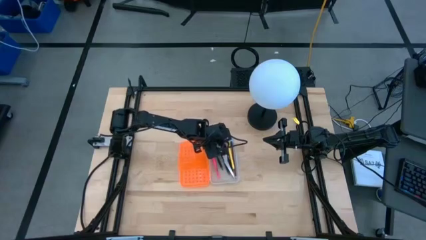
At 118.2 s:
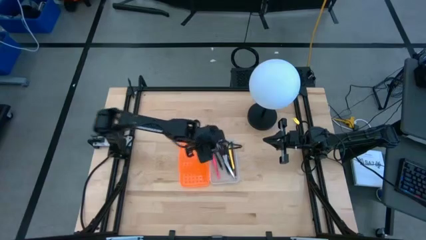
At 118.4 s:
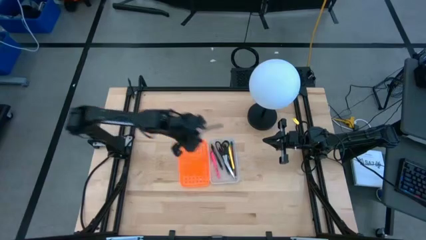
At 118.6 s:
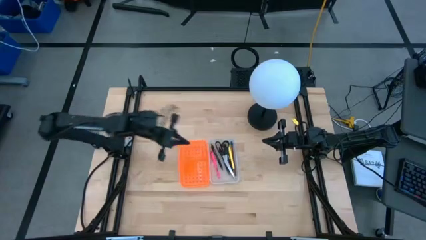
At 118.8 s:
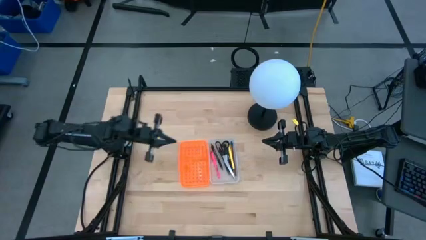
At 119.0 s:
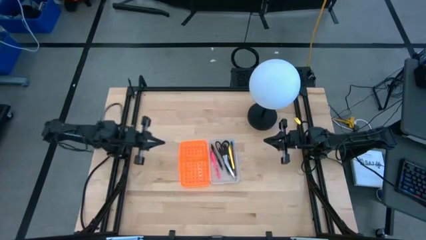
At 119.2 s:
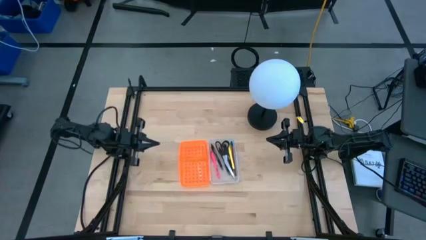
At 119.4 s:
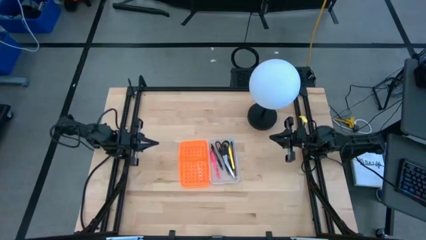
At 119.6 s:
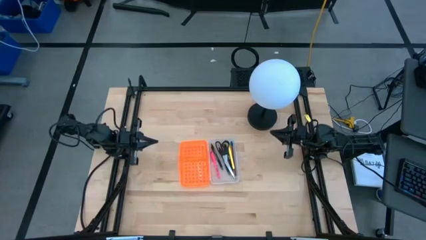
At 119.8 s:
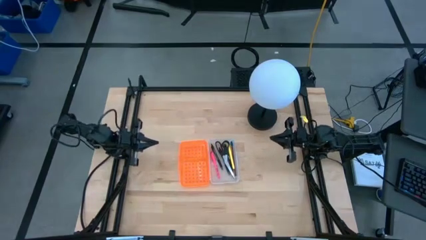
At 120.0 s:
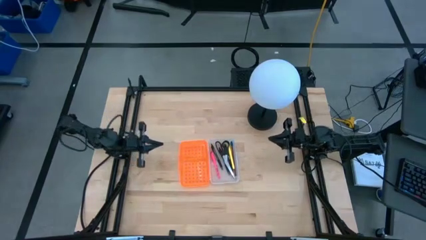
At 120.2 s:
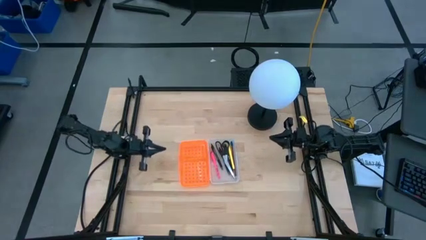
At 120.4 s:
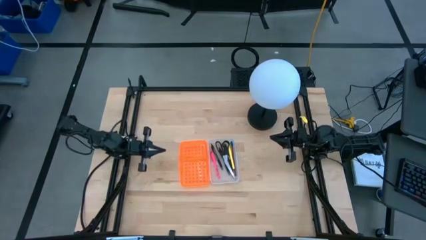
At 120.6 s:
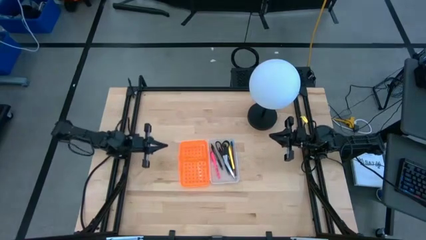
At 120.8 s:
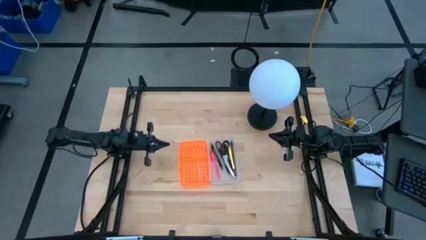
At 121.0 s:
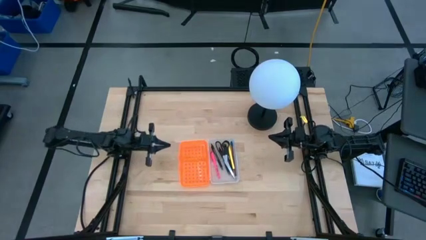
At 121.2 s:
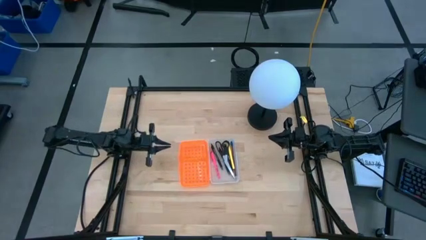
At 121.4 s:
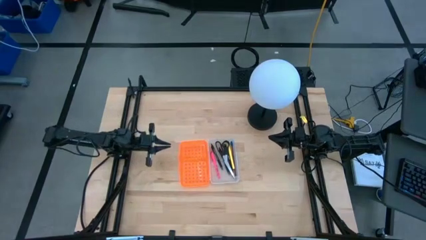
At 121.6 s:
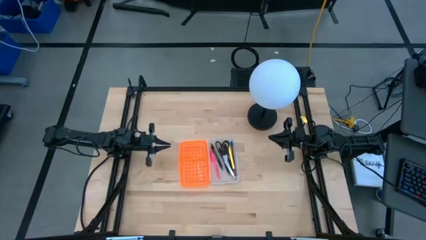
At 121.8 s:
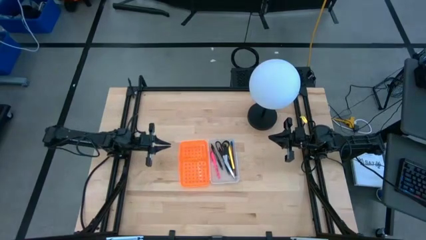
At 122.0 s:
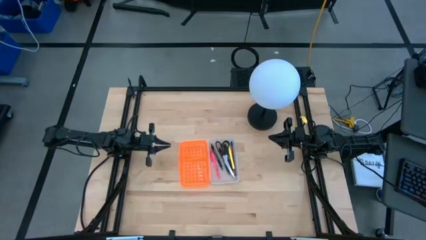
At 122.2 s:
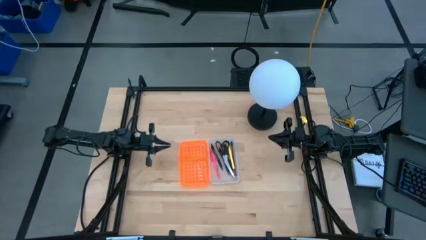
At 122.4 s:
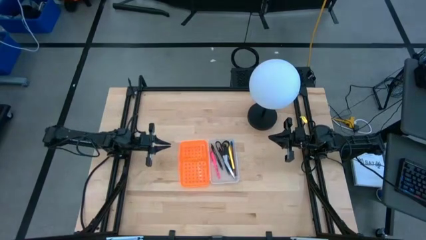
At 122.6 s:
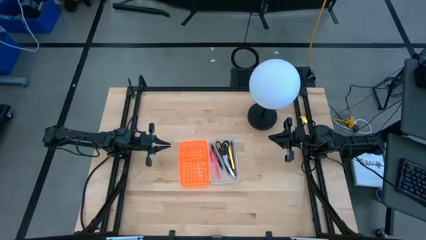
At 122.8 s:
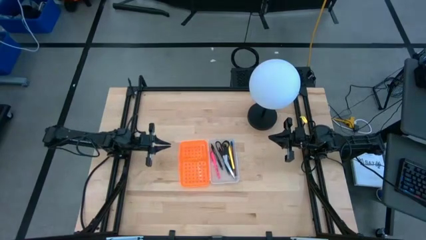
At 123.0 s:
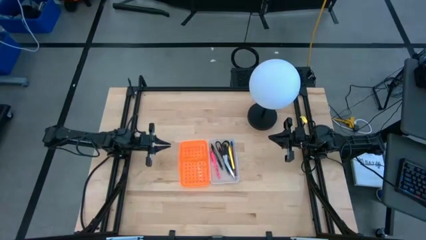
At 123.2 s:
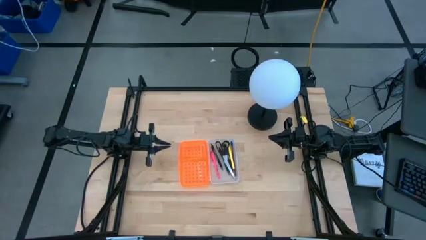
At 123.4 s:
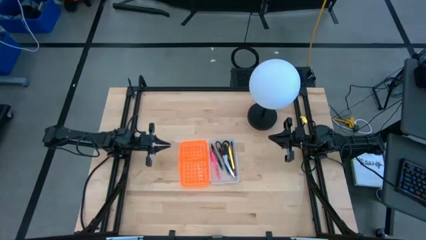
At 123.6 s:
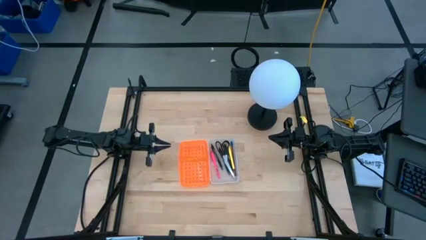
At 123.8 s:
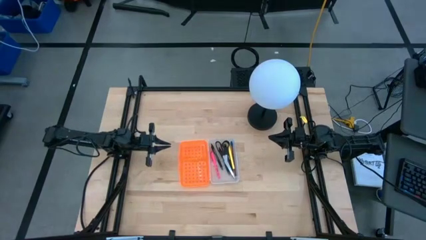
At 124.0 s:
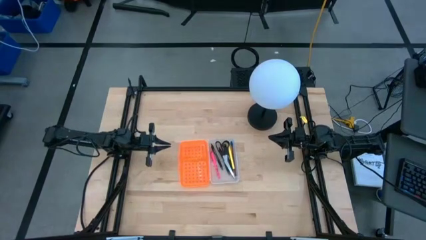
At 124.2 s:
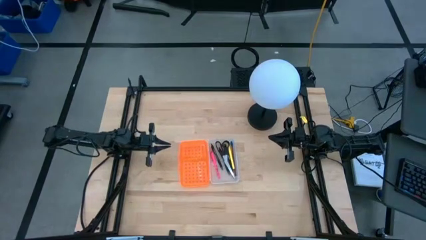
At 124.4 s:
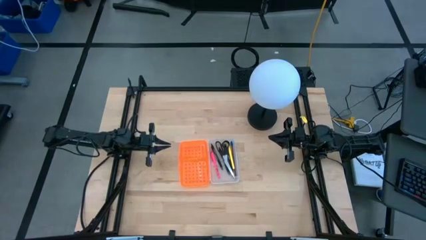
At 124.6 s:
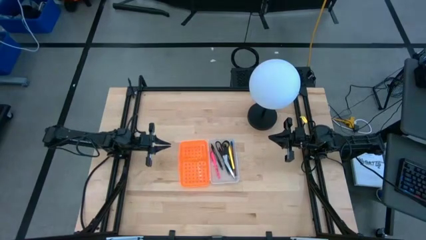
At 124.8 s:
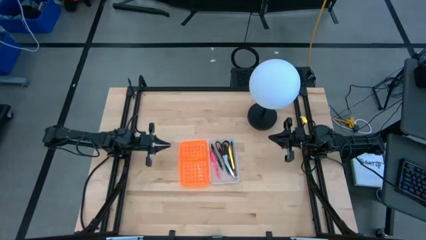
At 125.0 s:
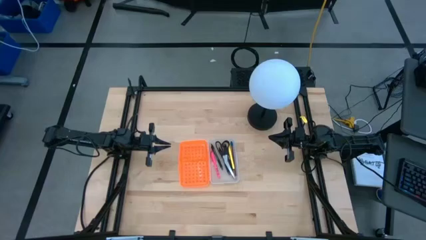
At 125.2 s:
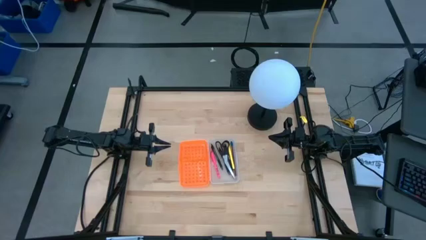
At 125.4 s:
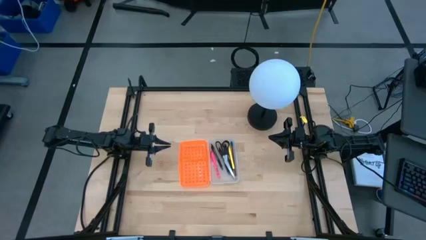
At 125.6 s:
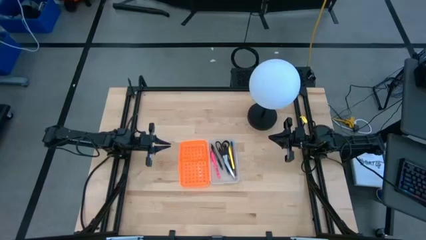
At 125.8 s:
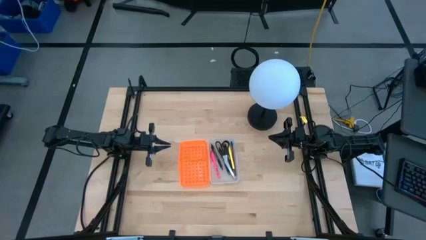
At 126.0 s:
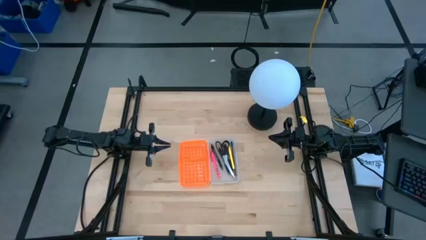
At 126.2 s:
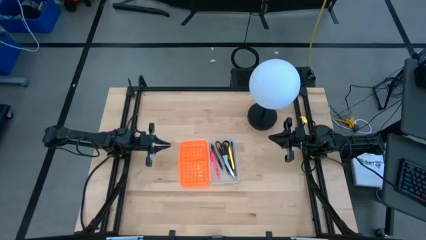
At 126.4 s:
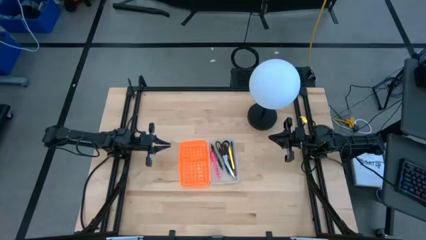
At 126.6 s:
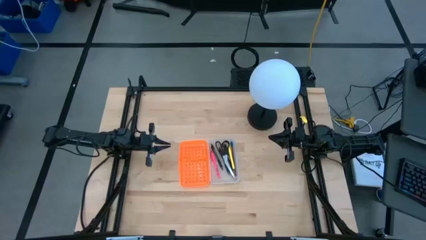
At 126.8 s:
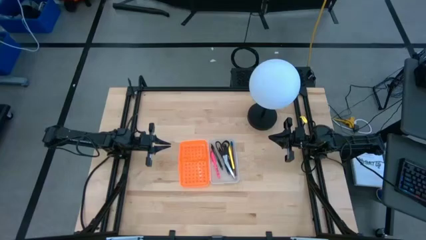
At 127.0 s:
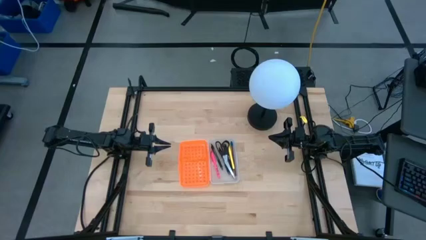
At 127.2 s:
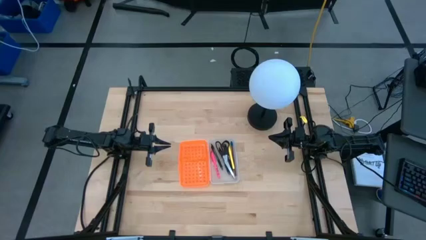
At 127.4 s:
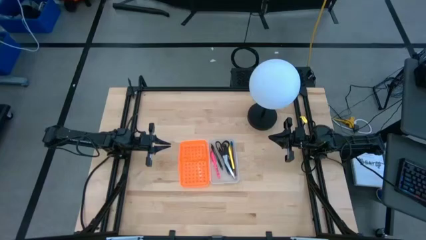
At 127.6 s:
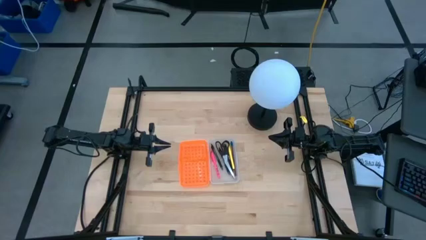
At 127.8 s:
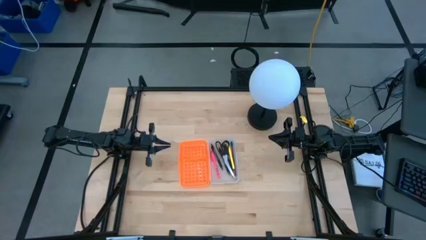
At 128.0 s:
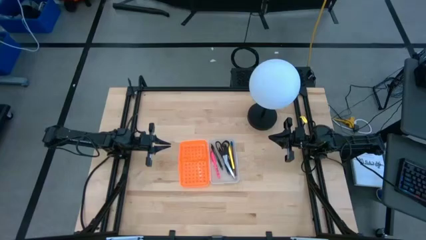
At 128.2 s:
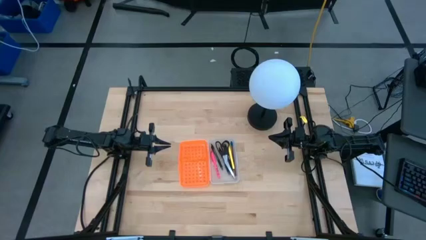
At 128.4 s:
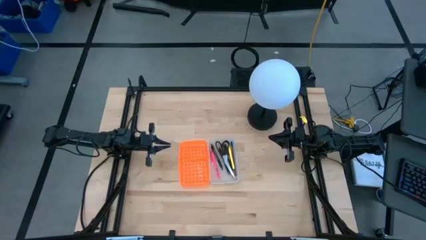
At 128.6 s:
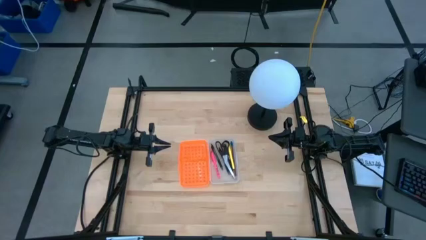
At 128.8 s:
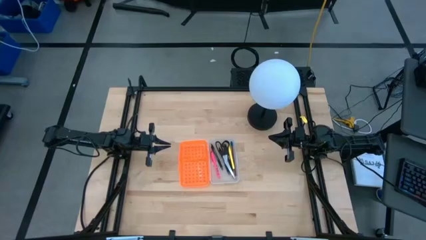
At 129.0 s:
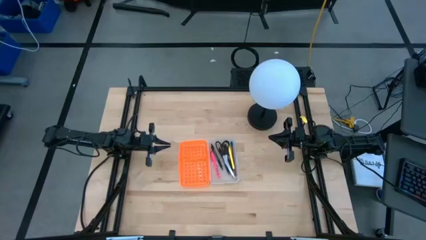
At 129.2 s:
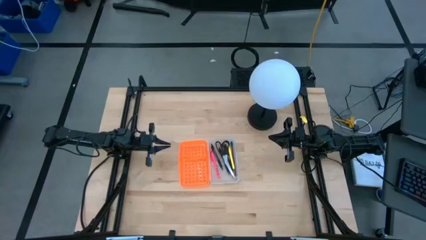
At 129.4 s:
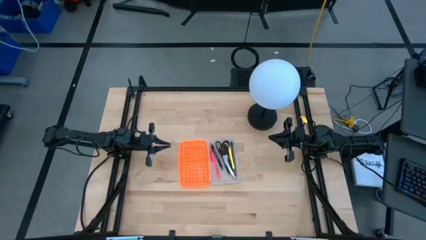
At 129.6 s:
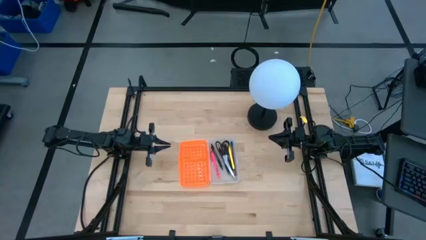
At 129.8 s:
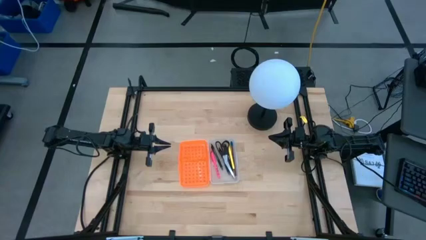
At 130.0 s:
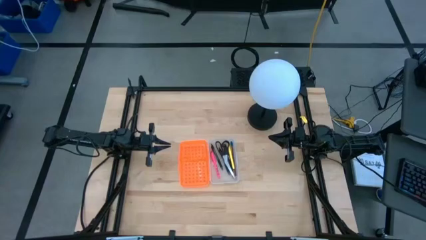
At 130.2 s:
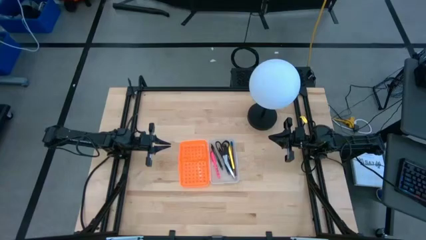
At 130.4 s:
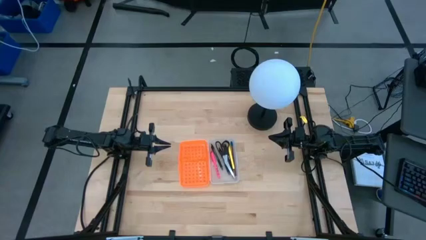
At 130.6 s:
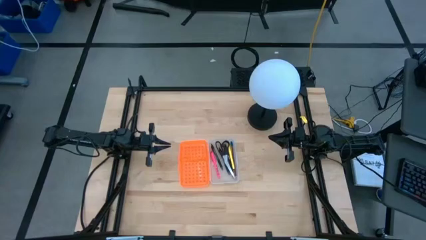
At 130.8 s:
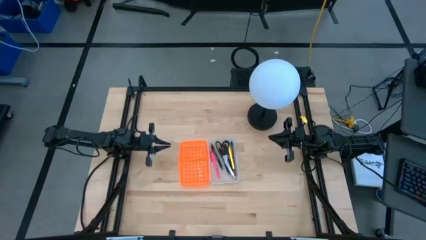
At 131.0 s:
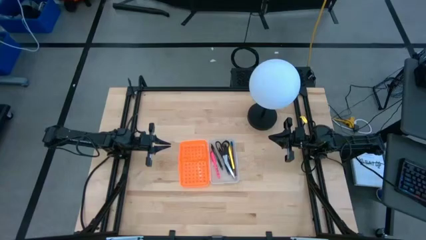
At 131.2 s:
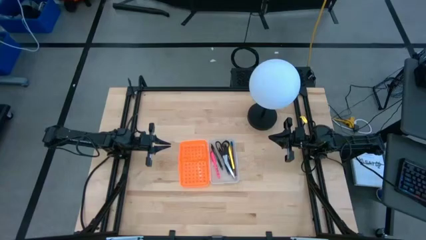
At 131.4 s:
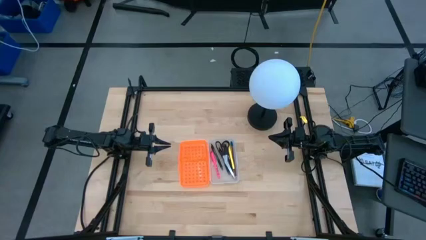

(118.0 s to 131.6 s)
Task: Pick & place school supplies into a supply box
Return to Home Position

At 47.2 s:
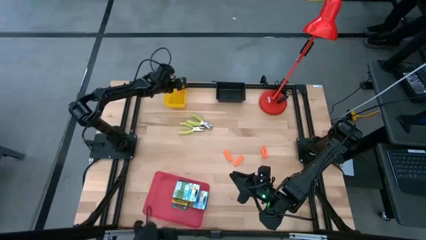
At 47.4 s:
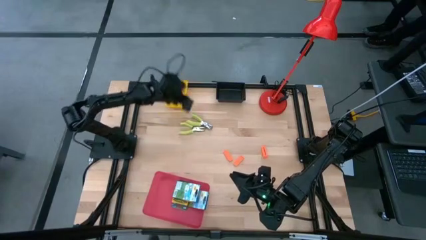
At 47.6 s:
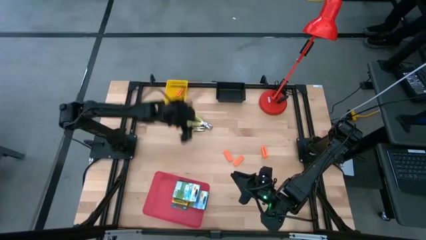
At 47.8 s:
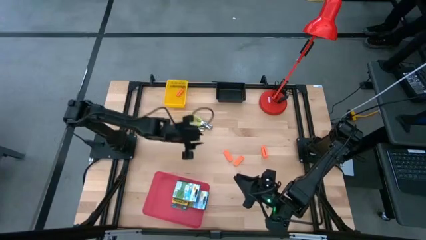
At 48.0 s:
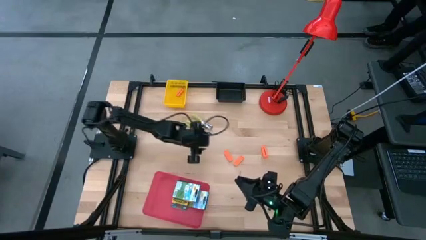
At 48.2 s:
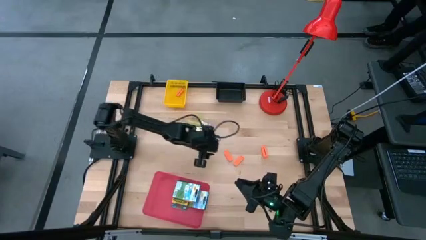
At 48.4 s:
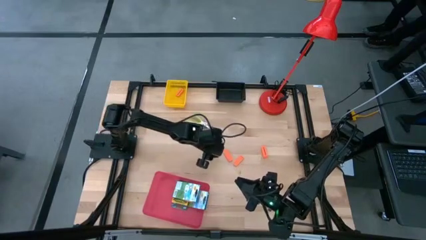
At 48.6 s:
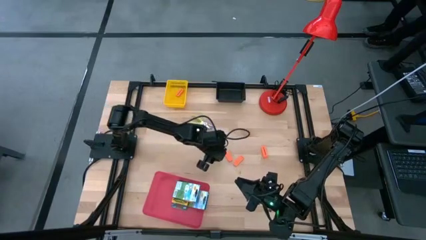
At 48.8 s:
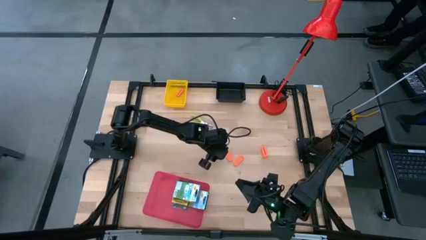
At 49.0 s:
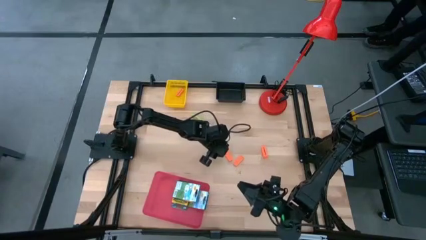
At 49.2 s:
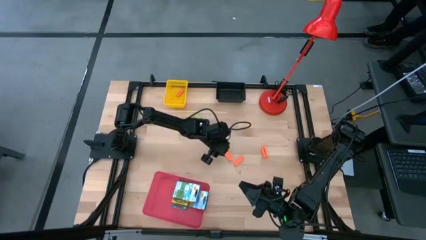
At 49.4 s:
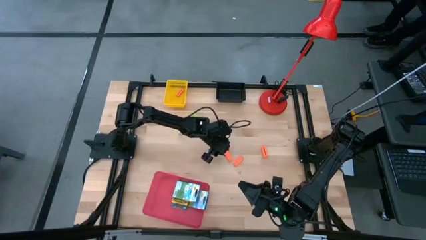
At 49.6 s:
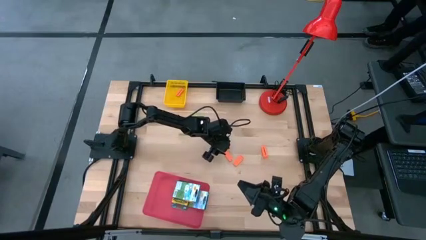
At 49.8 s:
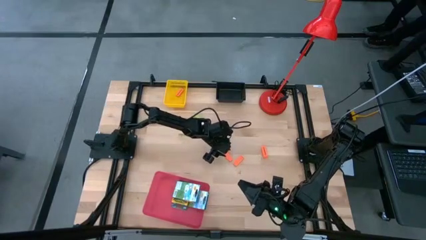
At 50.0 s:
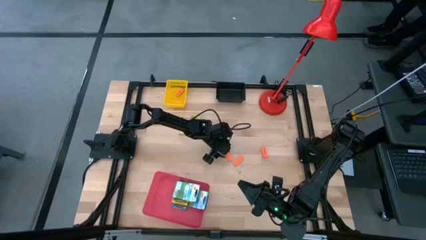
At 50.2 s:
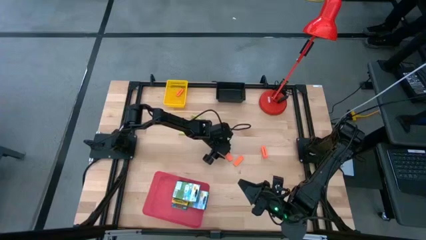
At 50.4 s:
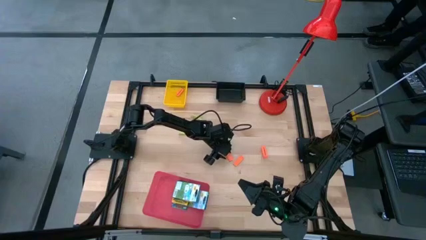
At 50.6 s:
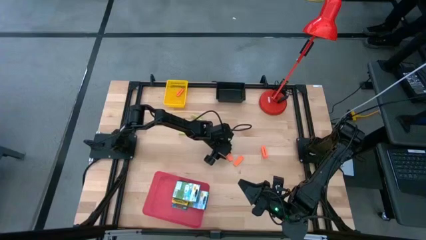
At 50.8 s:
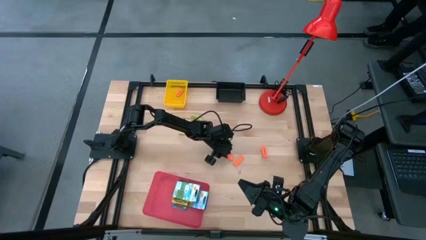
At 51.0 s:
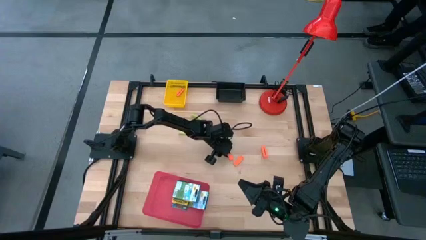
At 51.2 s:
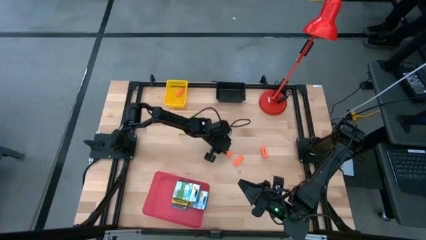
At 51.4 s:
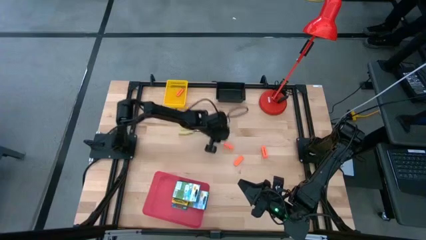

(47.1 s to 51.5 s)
Task: Pick & Place School Supplies
Put the orange eraser into the yellow bin
